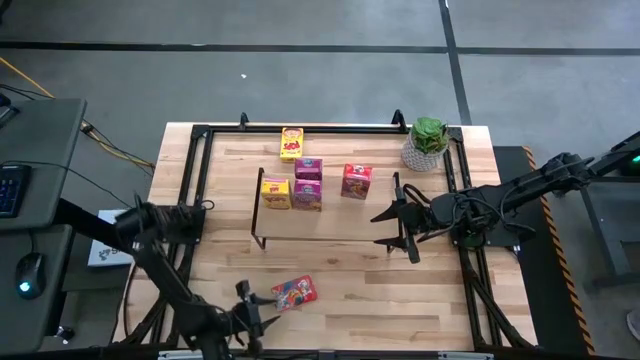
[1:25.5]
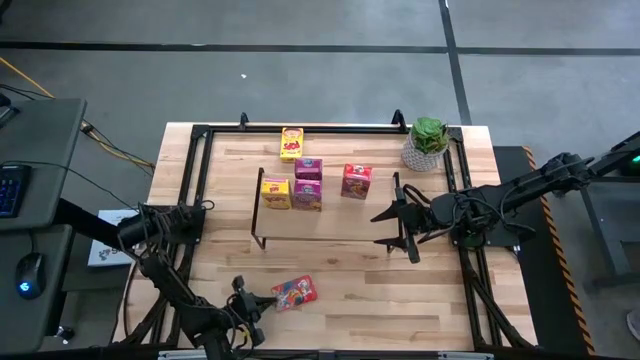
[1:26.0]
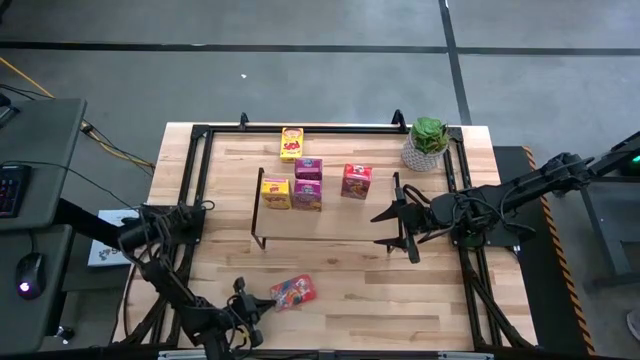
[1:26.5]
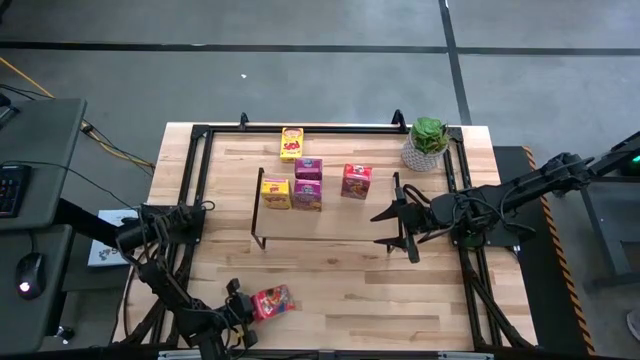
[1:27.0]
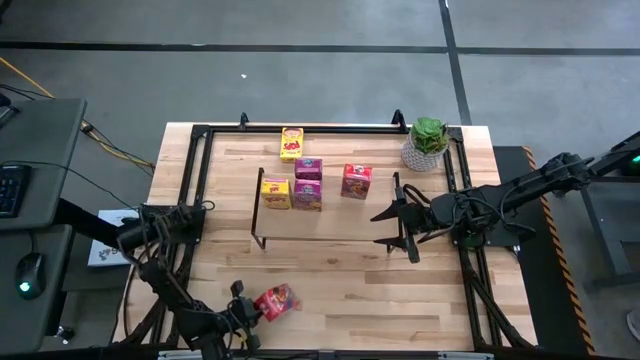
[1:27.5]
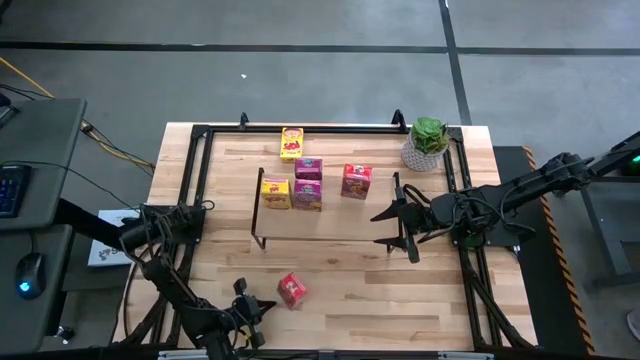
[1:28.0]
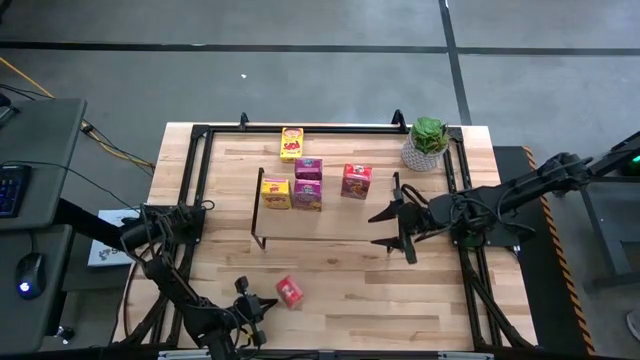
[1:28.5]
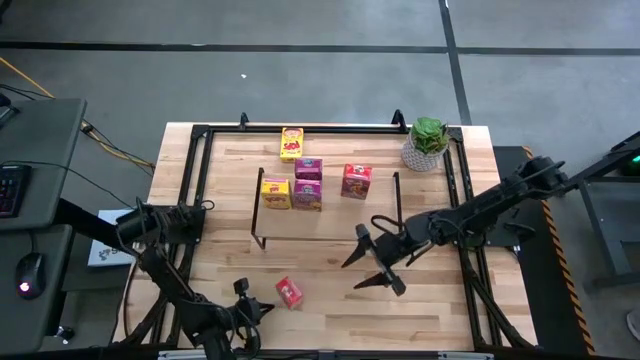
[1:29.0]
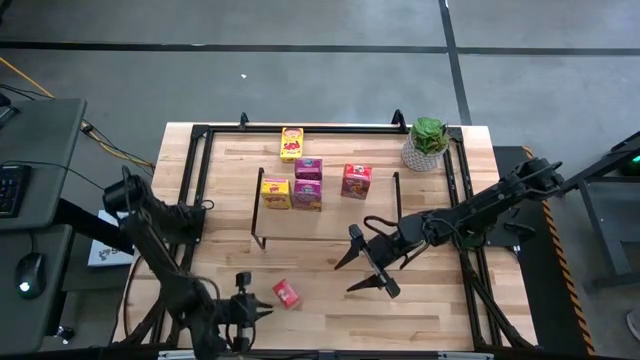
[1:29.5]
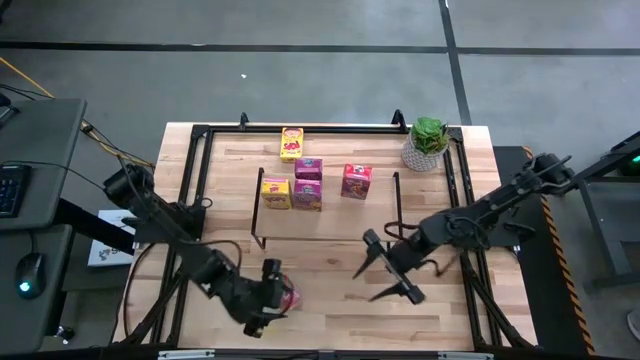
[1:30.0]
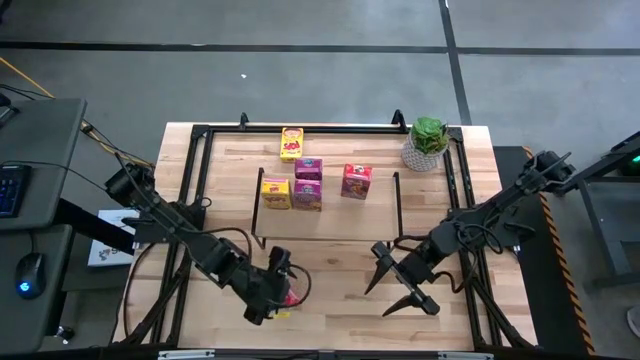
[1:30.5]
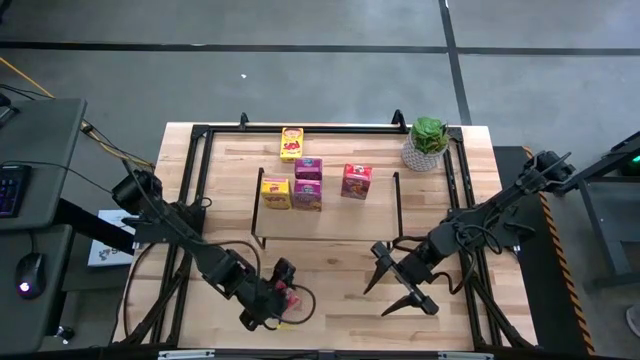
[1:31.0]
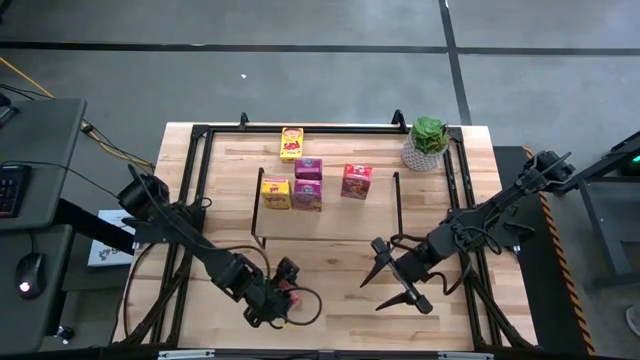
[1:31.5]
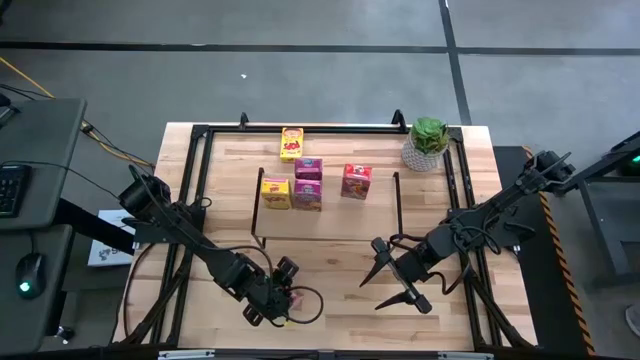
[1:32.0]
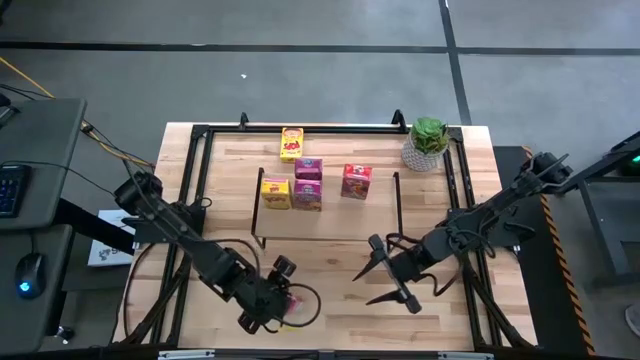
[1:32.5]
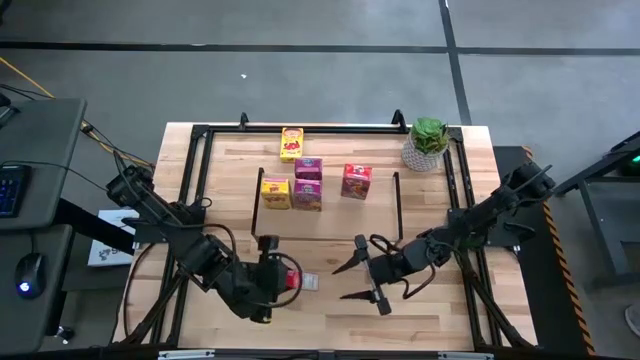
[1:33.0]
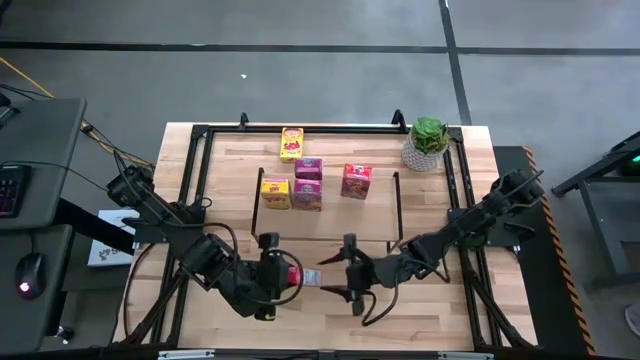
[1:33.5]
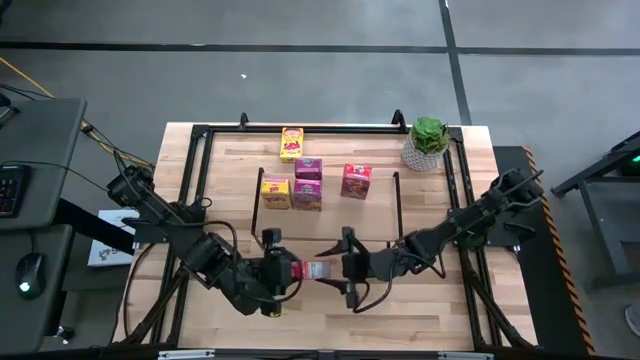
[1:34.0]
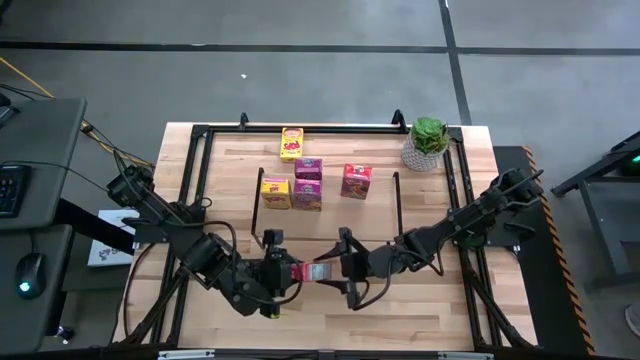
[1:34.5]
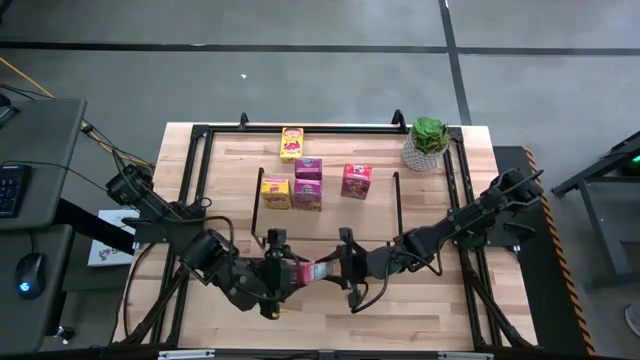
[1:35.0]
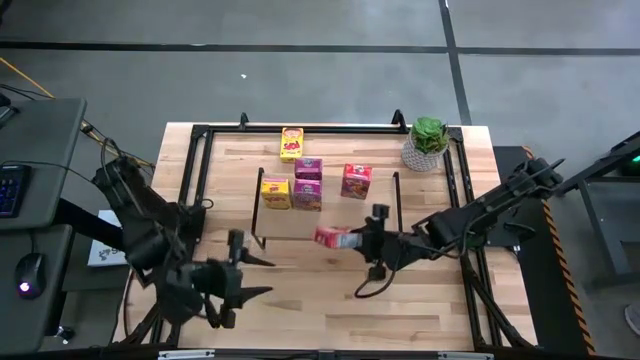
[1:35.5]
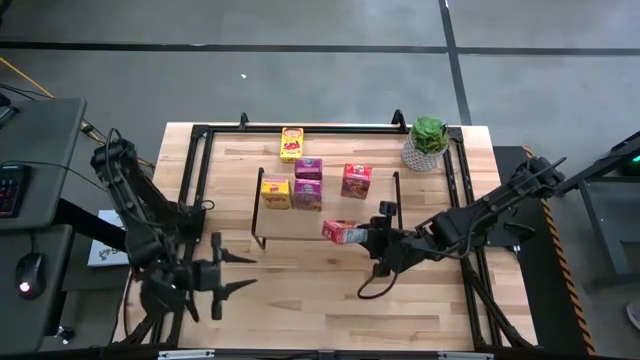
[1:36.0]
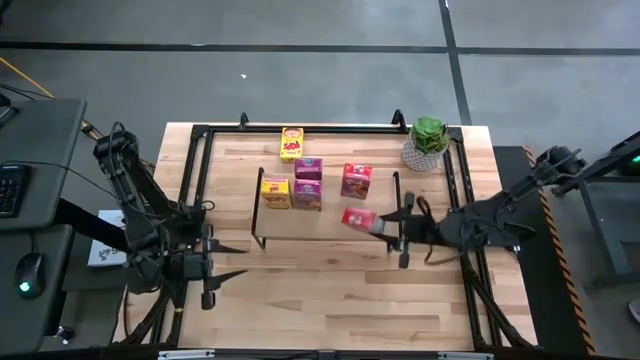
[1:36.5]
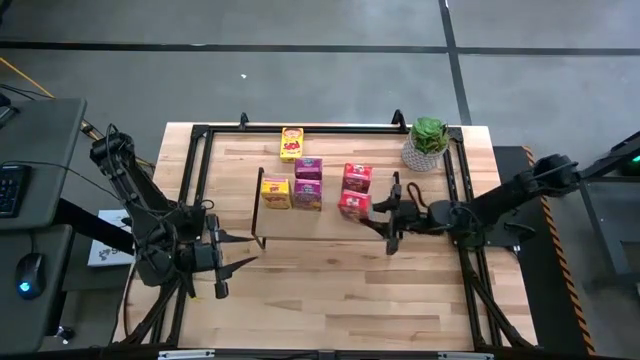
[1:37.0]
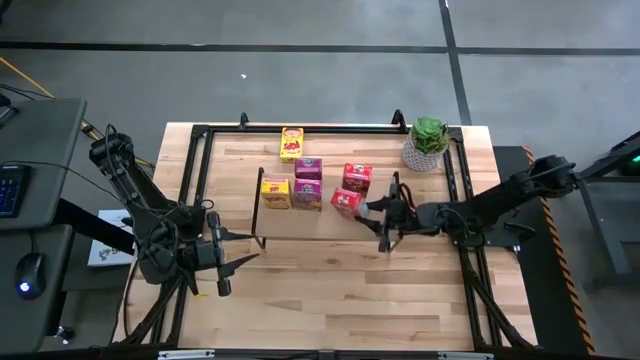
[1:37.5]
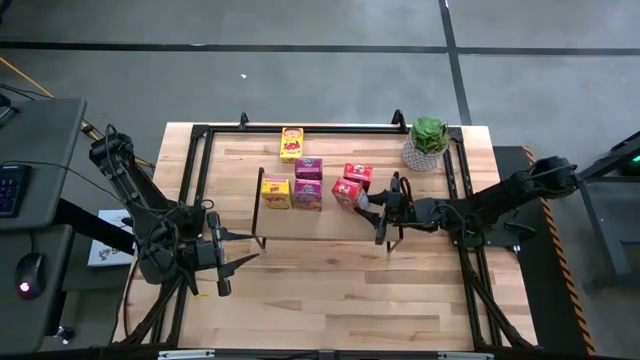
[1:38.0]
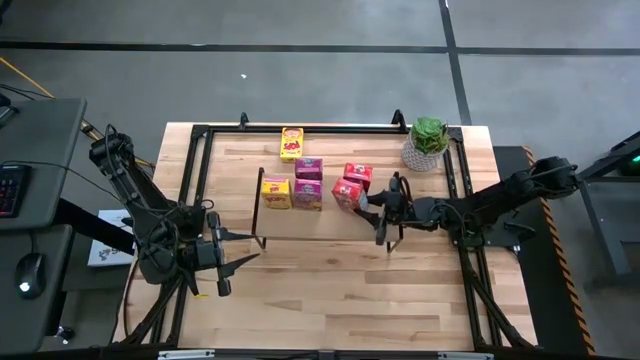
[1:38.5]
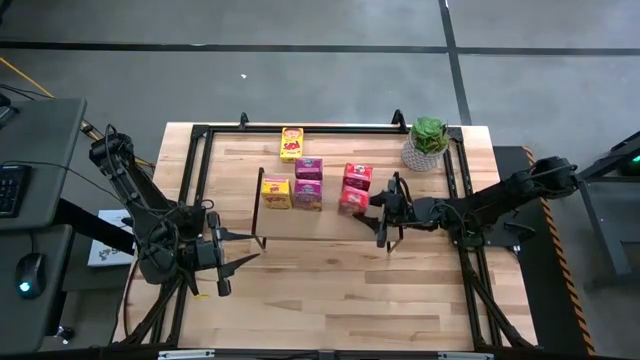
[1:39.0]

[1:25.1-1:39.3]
Task: Stack cereal on shelf
Put the red cereal box on the shelf

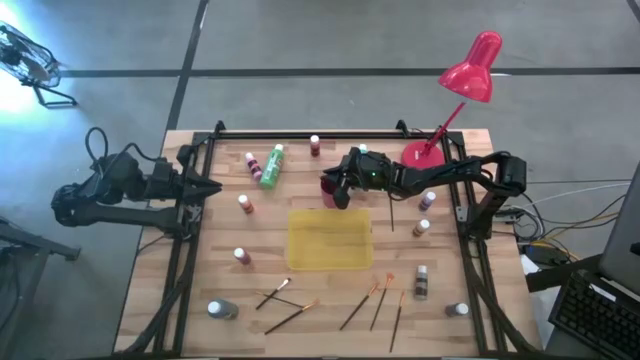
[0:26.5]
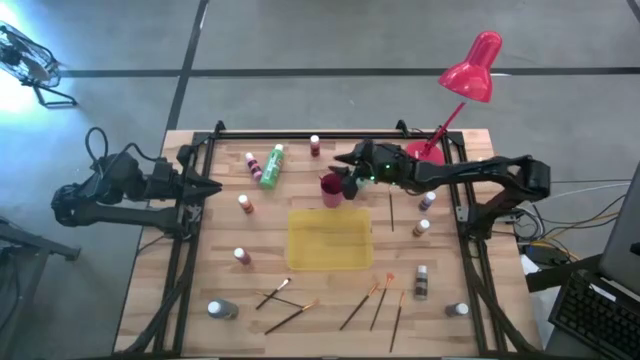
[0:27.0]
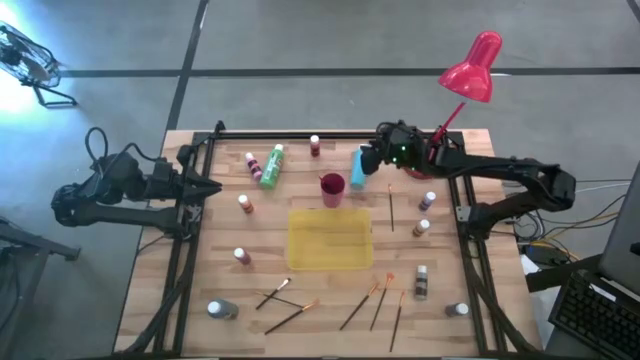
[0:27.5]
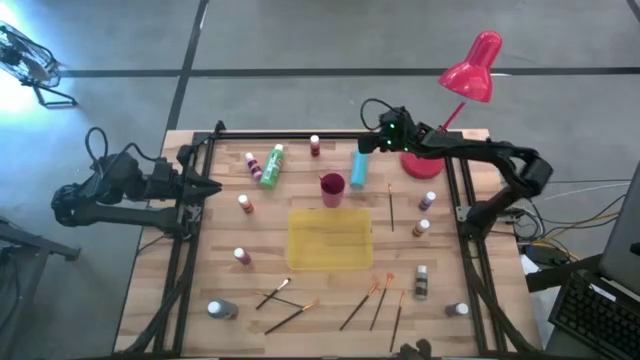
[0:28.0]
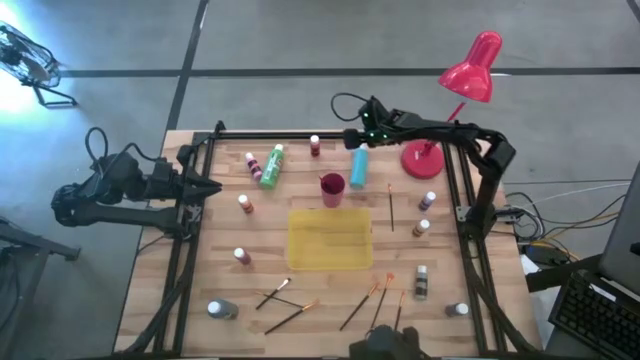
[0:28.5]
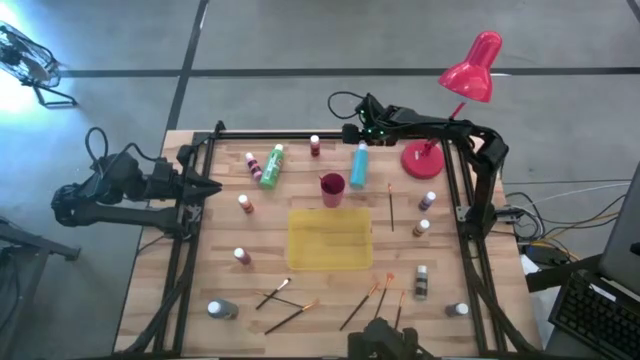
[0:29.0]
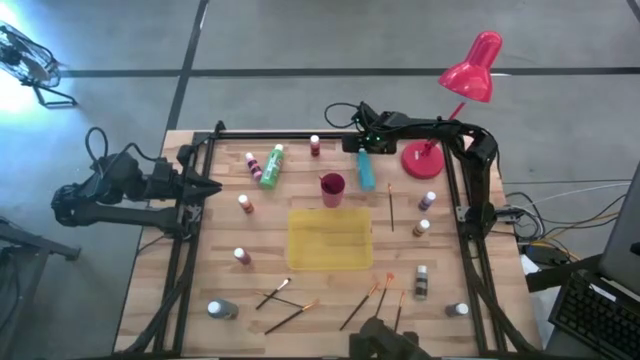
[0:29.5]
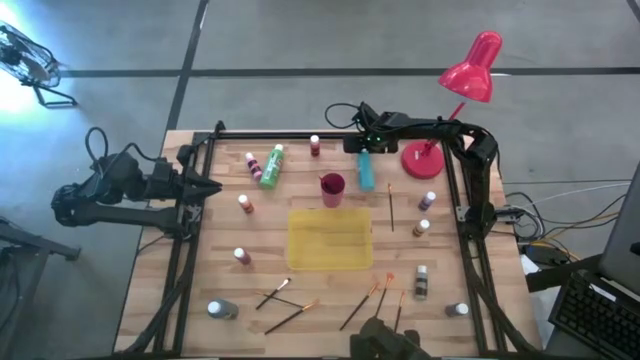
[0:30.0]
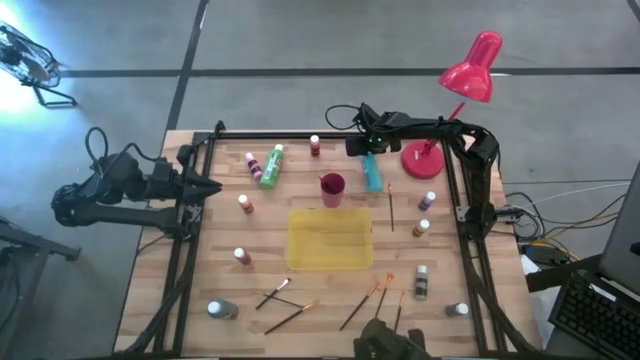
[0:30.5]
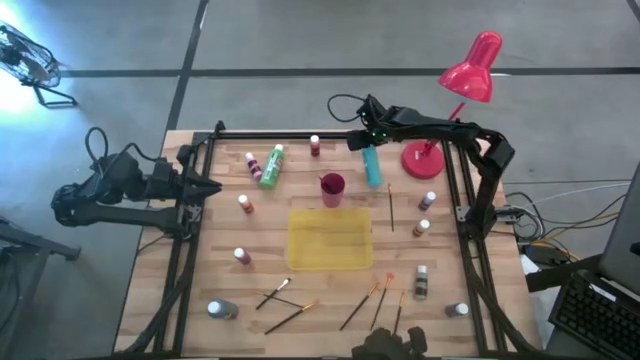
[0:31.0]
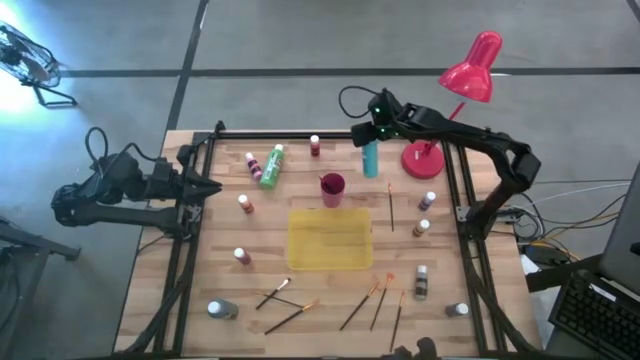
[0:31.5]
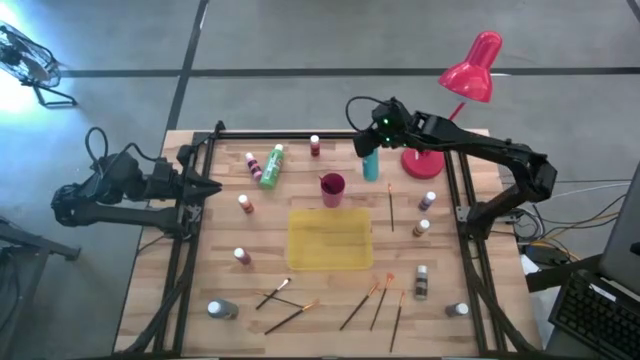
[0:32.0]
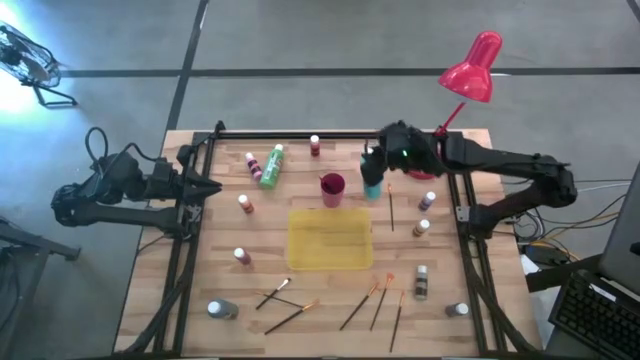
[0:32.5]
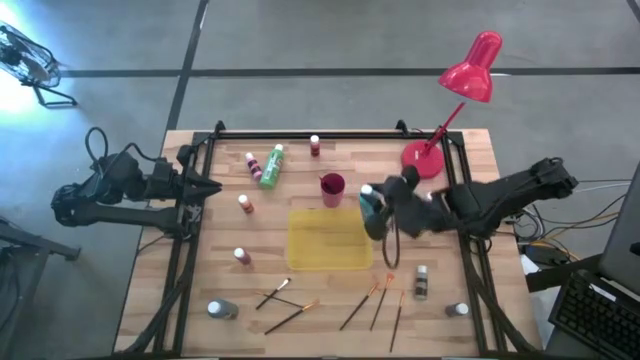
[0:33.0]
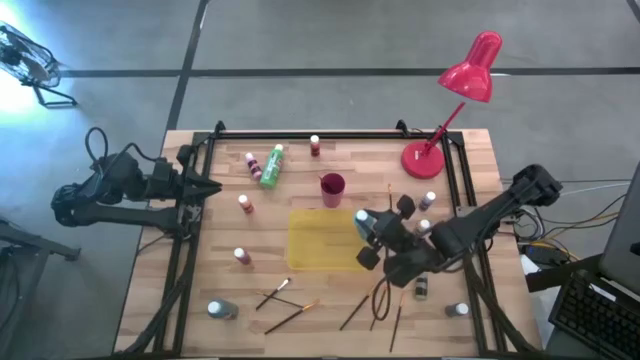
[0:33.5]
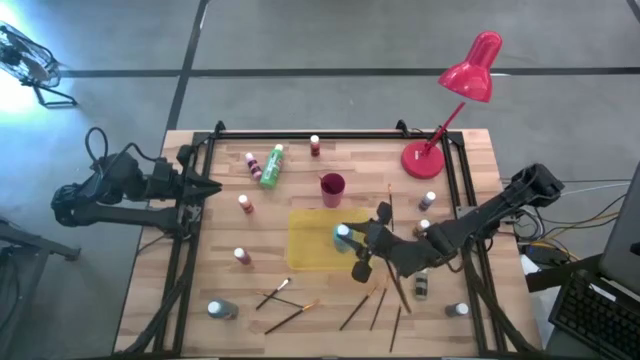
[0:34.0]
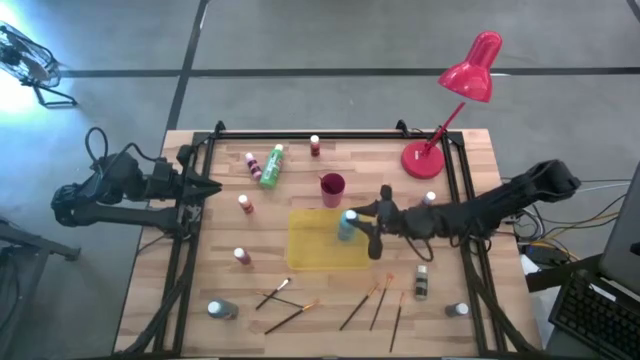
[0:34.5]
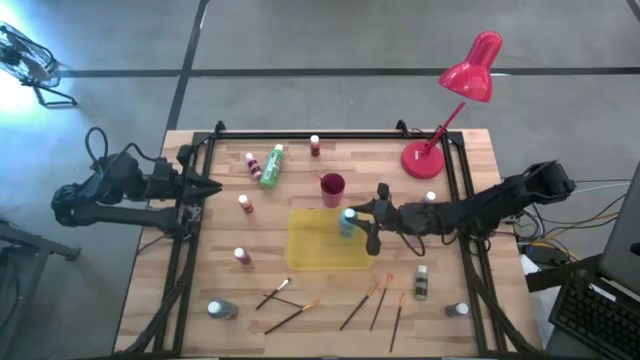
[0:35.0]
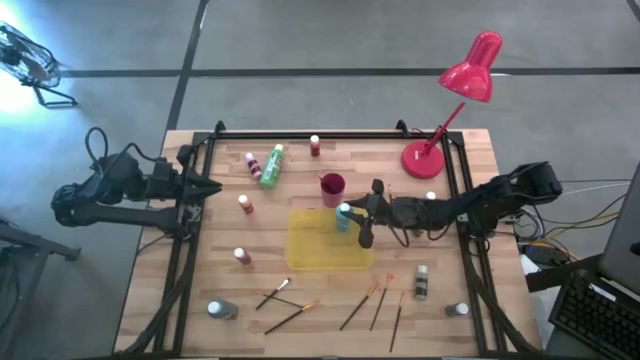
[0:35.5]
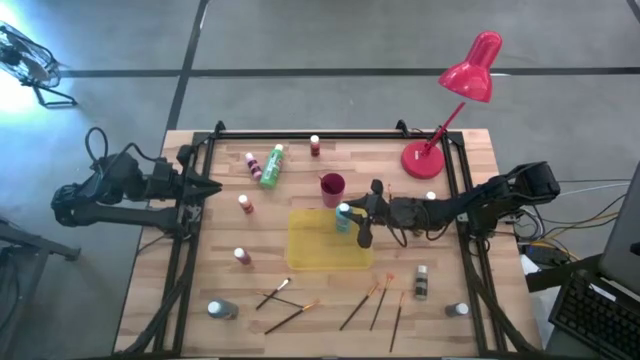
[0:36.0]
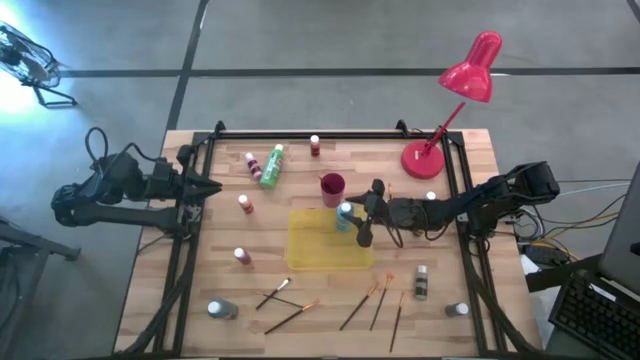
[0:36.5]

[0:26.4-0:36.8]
Task: Pick & Place Paint Supplies
Put the large light blue paint bottle into the yellow bin
